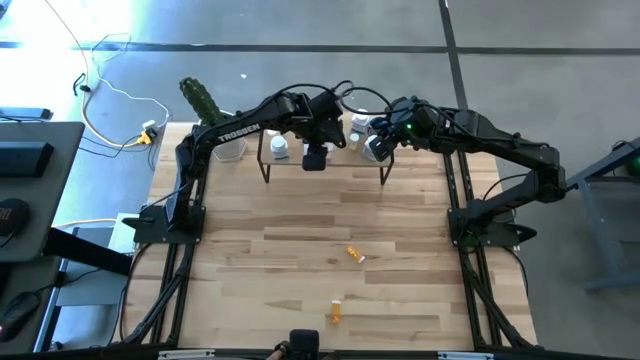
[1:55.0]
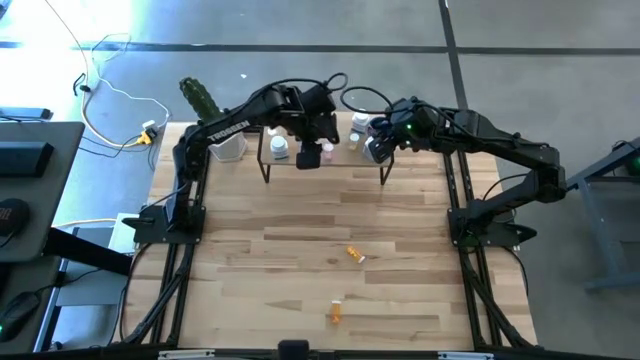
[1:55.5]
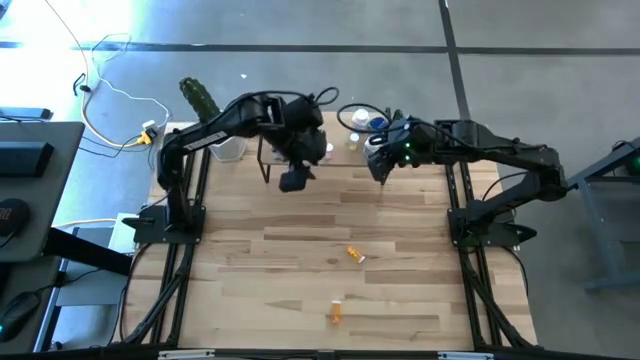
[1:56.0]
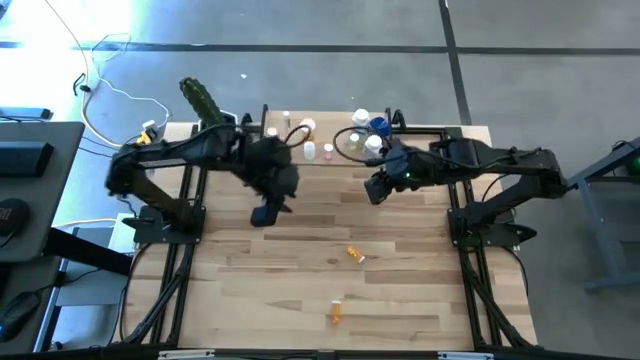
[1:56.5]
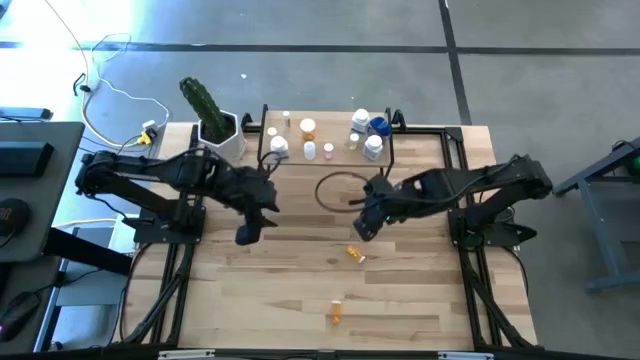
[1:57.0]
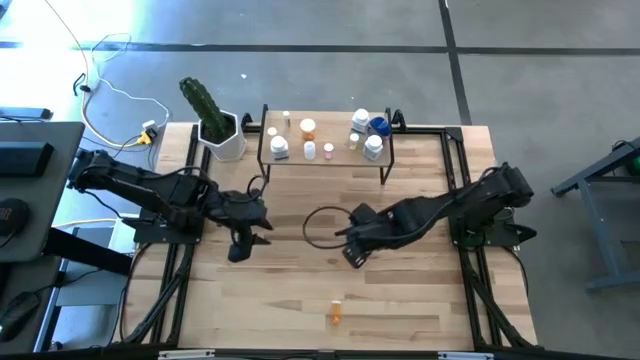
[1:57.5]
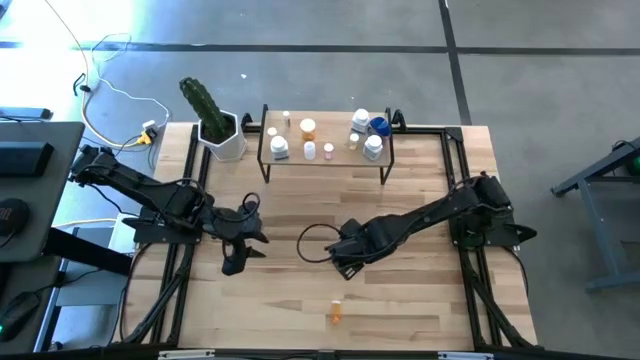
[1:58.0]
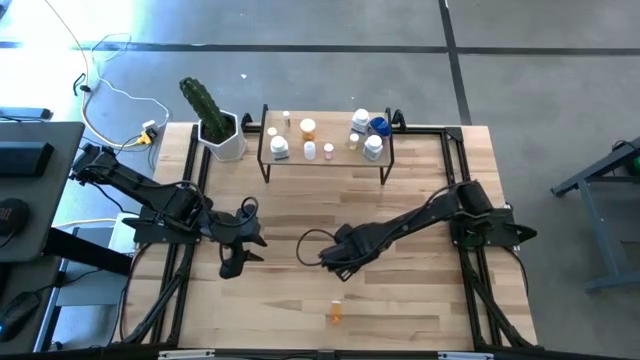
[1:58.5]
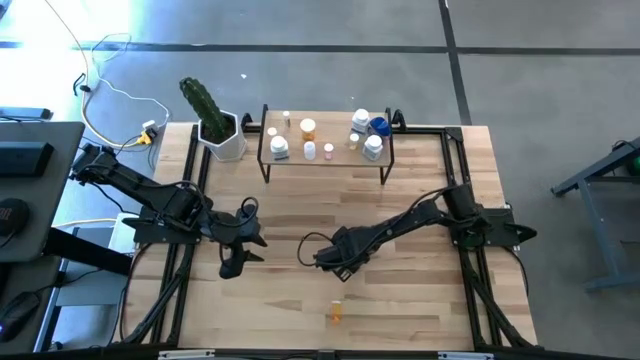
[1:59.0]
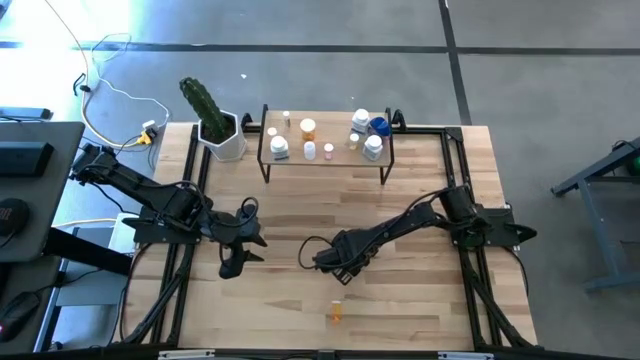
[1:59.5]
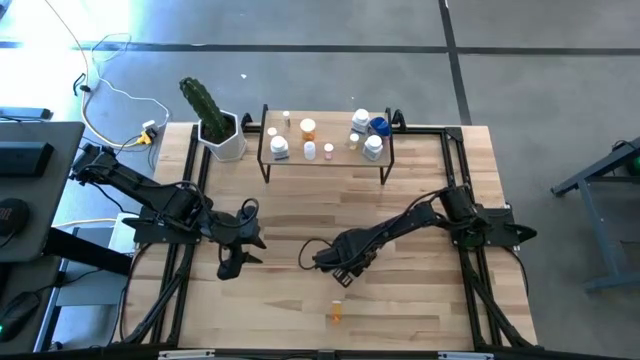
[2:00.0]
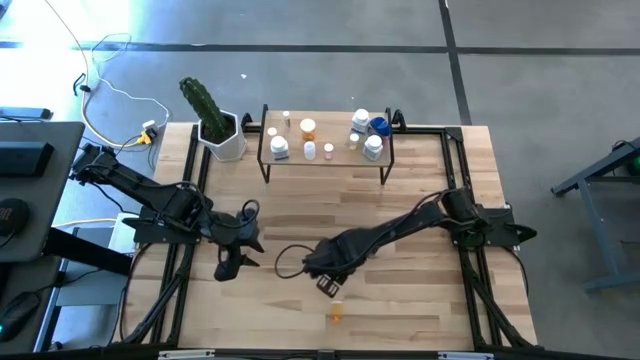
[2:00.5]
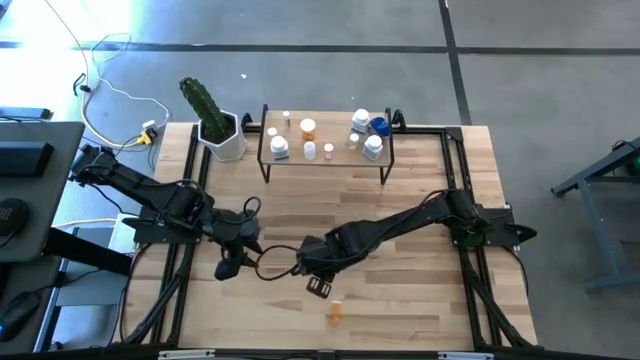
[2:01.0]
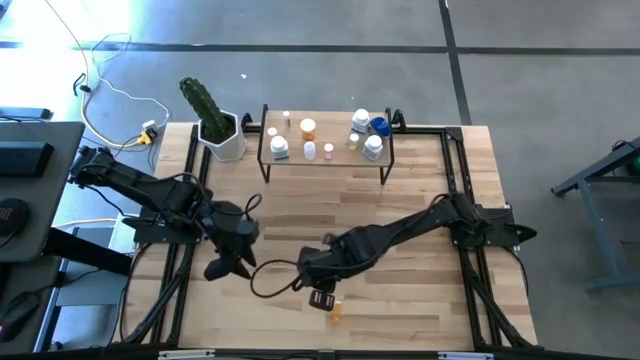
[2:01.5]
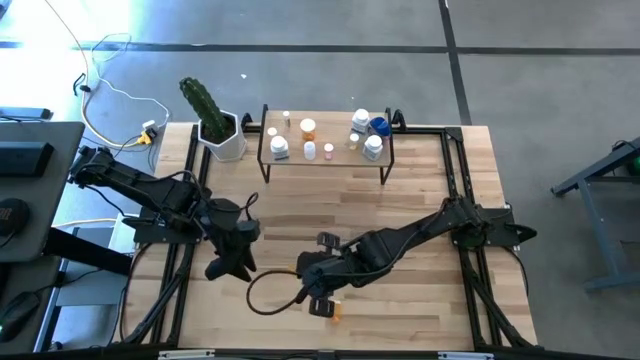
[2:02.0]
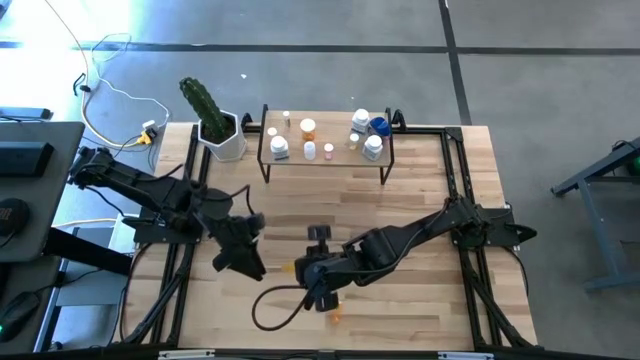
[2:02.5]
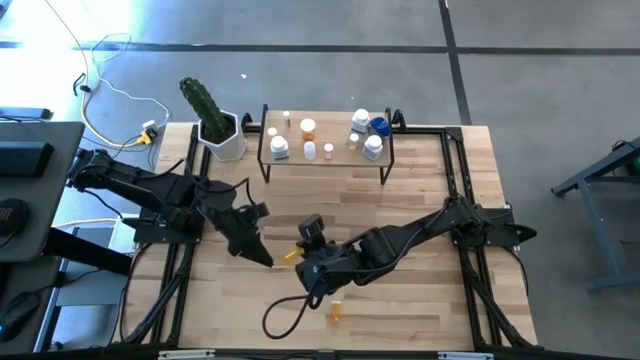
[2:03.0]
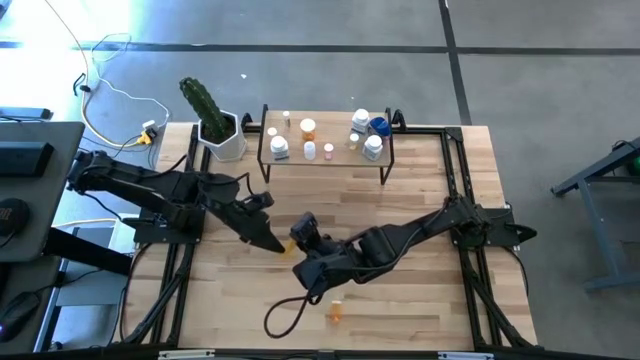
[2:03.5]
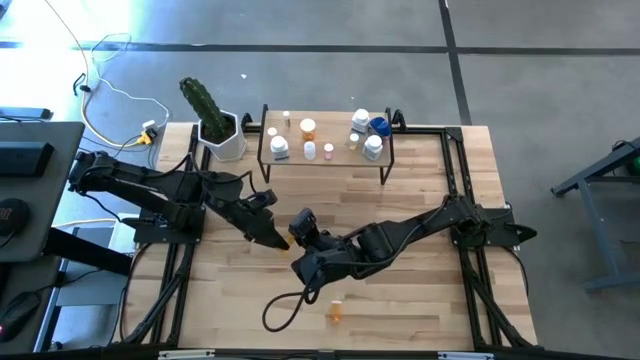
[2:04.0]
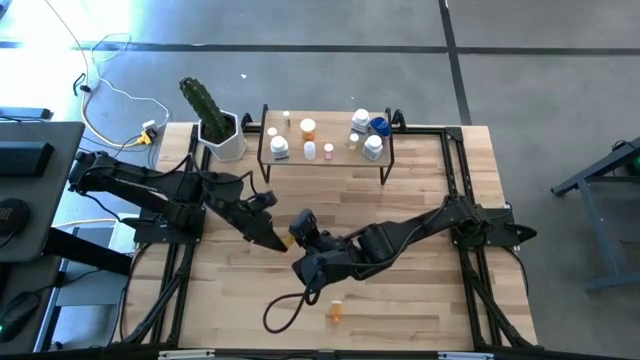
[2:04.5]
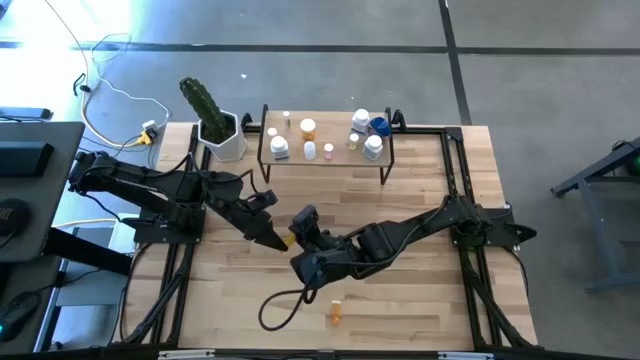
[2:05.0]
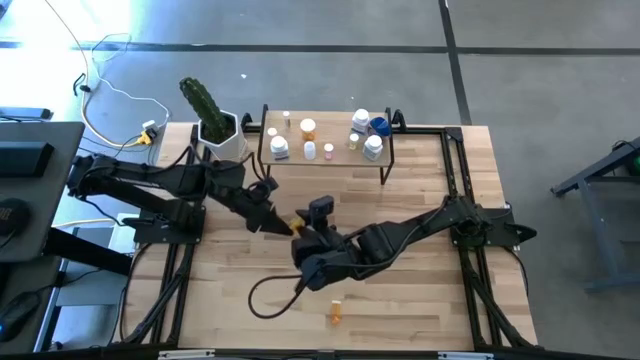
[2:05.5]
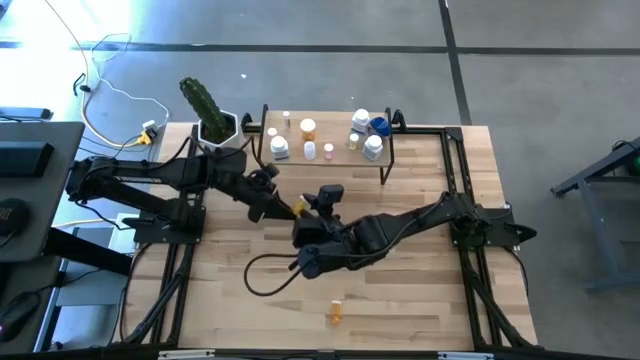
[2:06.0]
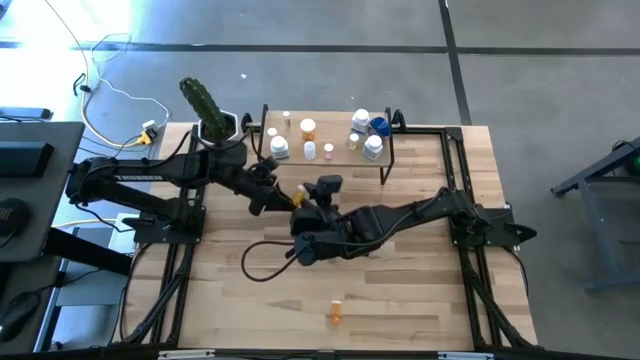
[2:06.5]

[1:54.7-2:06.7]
Task: Pick and place medicine bottles onto shelf by color
Put the top small orange pill bottle on the shelf

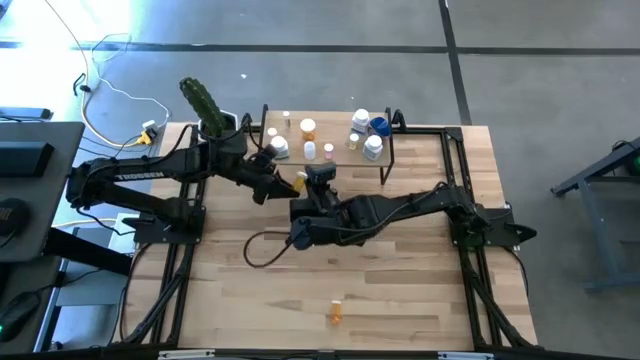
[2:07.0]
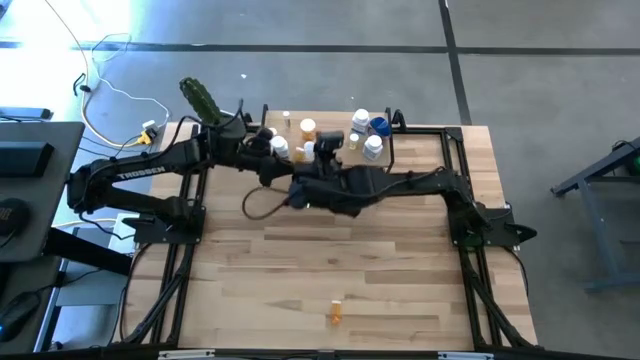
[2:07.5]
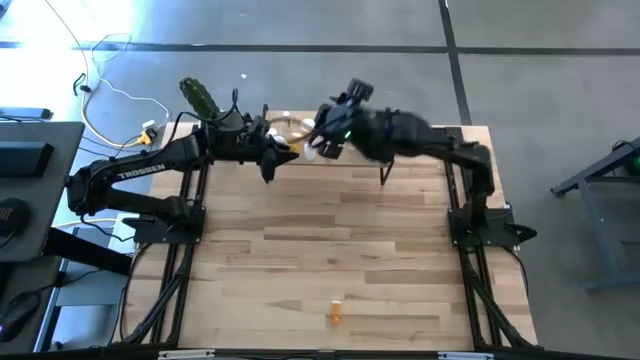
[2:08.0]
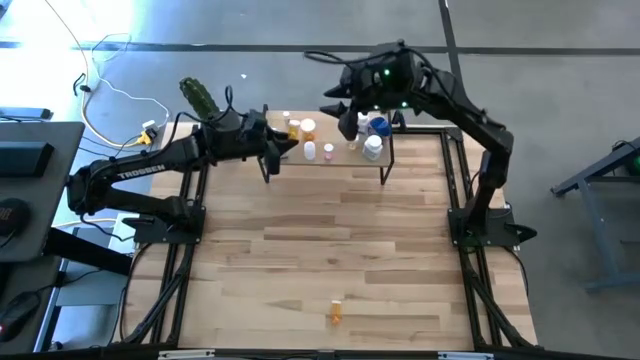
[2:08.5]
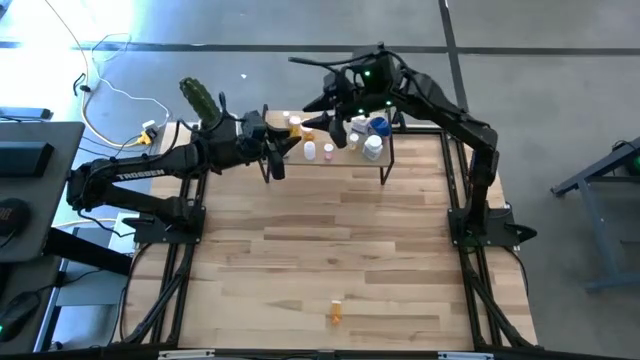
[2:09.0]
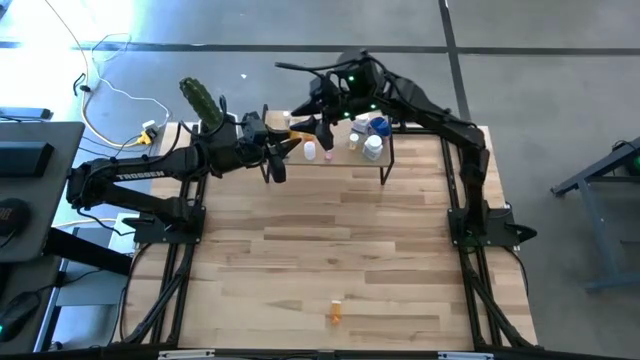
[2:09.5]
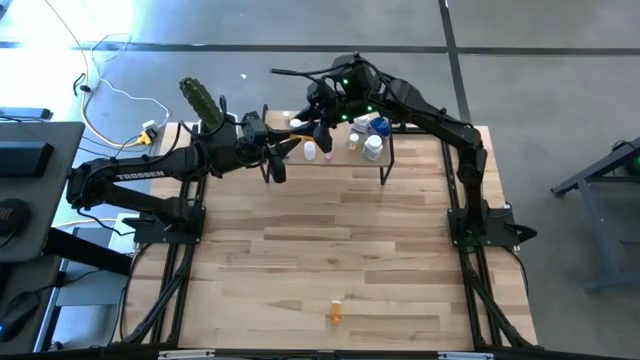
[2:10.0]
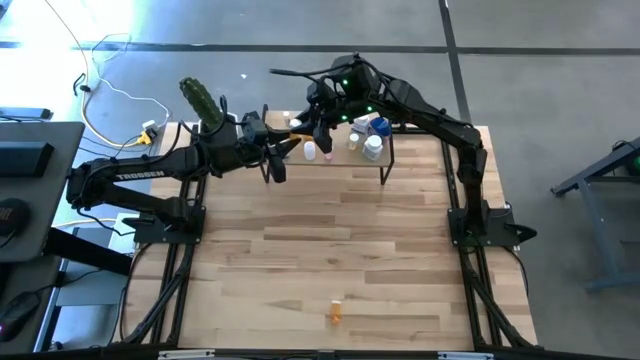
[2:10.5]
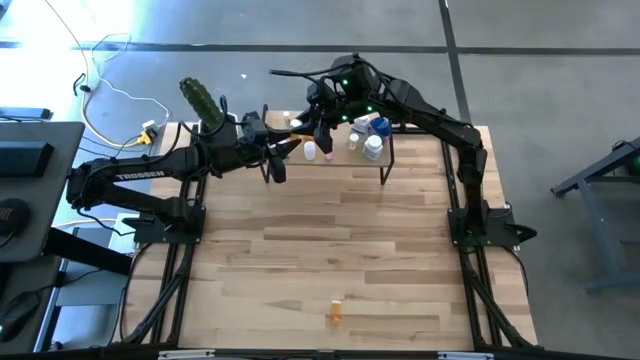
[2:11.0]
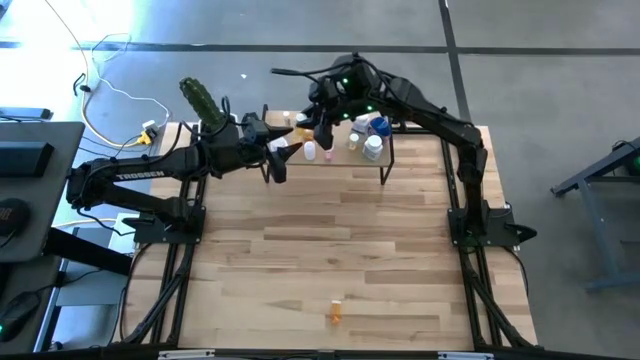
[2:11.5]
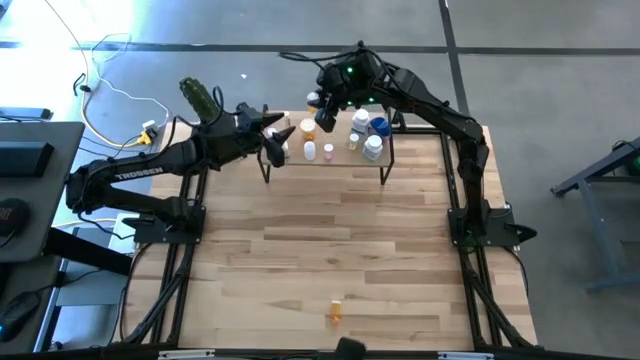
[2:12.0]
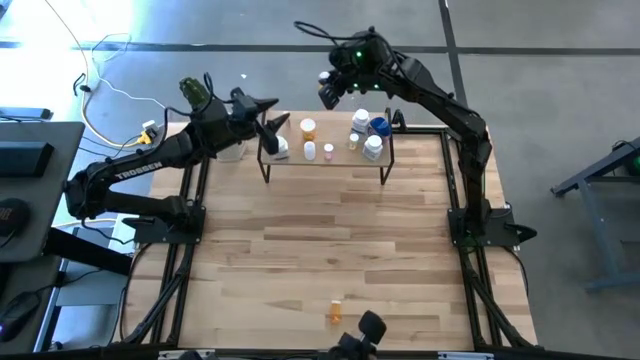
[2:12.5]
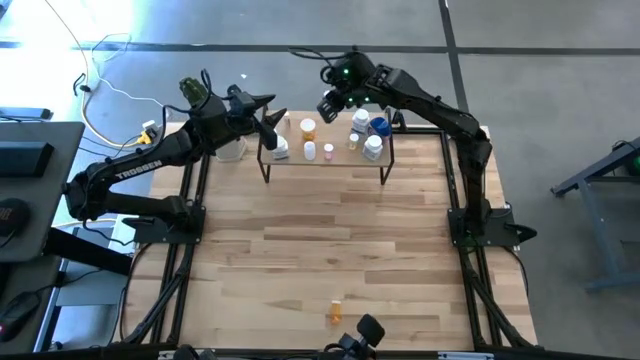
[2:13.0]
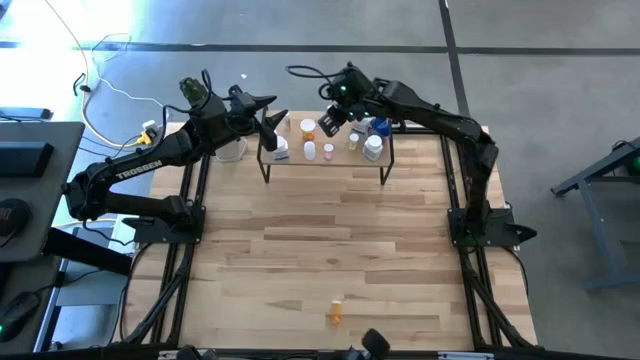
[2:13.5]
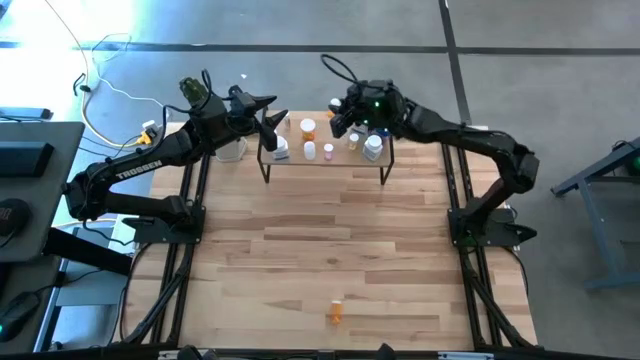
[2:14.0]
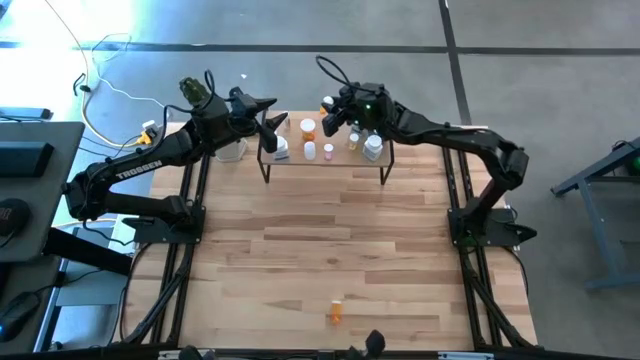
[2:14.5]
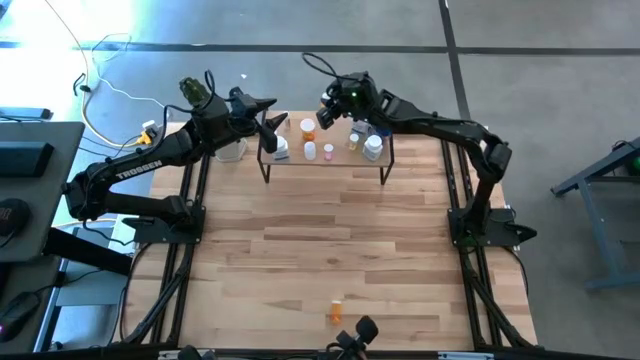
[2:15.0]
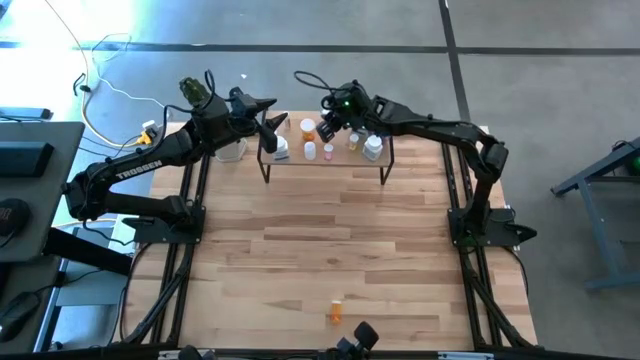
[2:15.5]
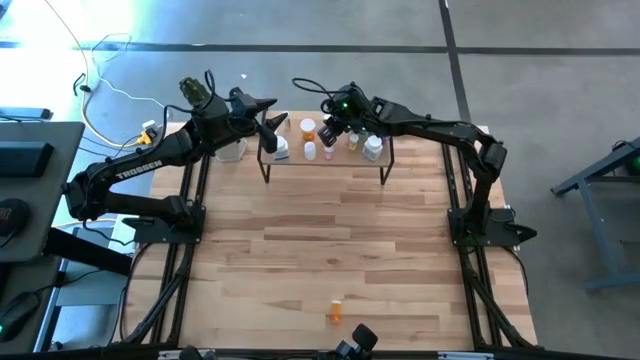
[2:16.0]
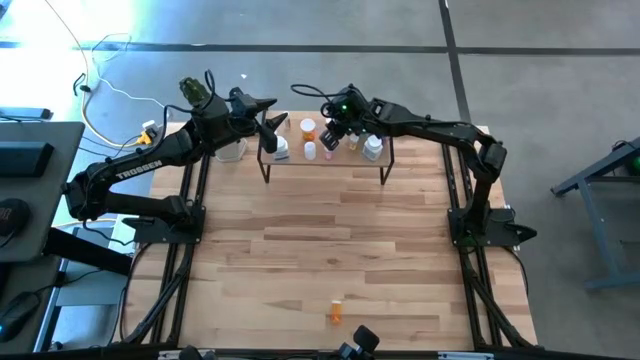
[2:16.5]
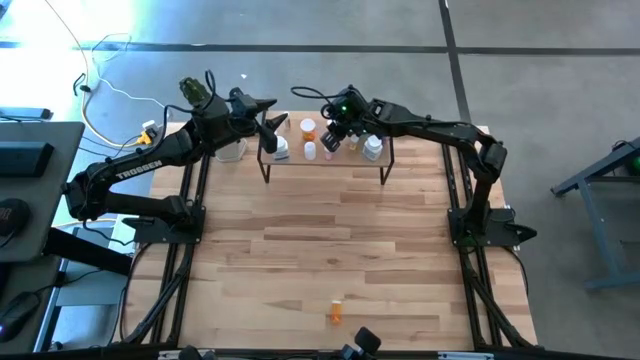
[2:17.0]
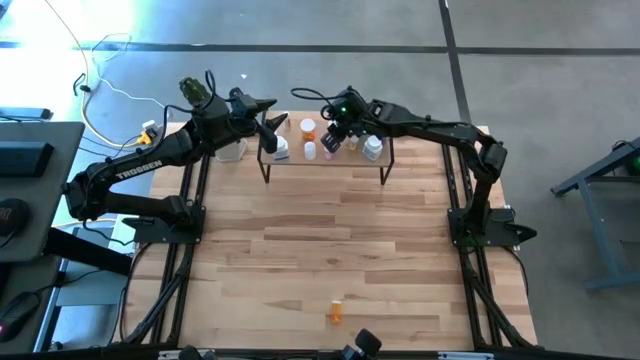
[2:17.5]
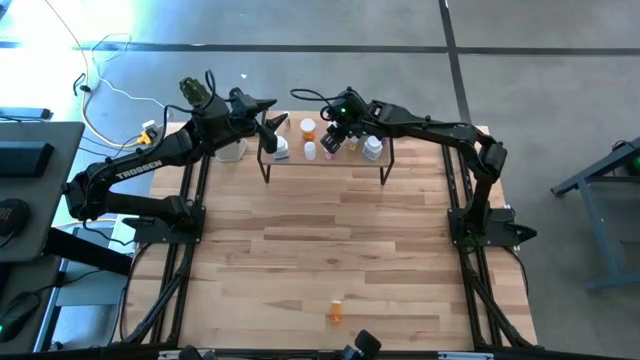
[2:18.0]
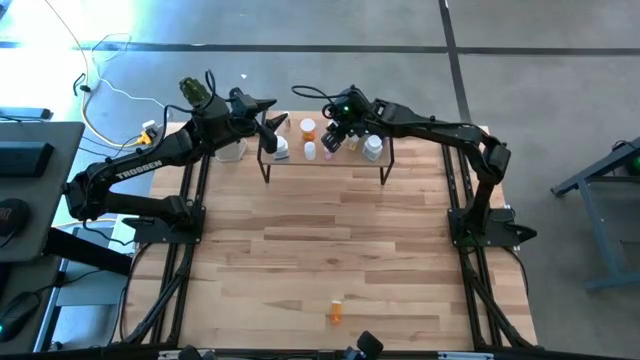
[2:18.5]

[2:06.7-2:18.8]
Put the top small orange pill bottle on the shelf
